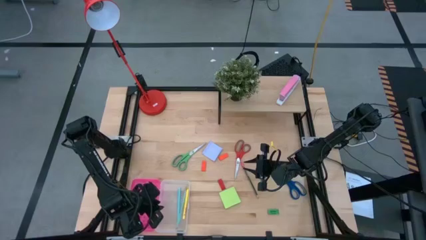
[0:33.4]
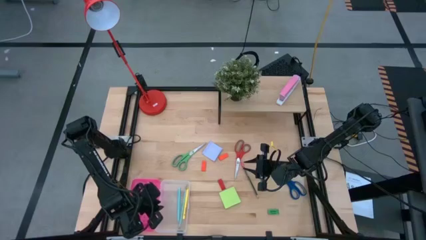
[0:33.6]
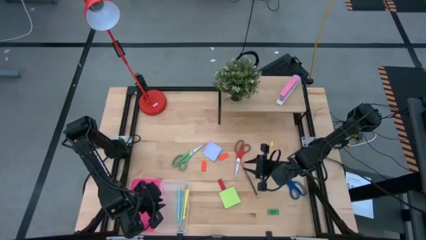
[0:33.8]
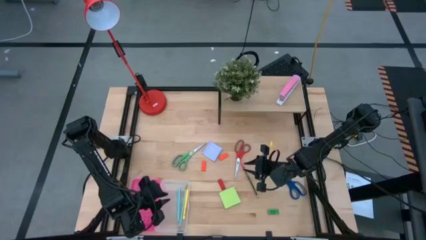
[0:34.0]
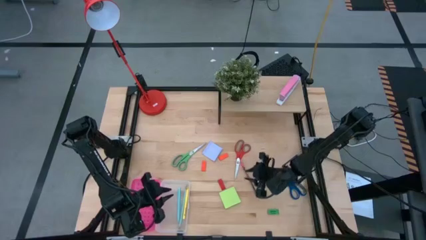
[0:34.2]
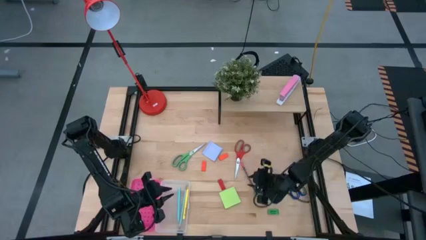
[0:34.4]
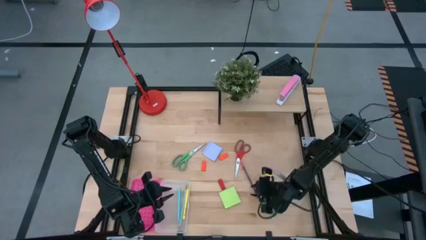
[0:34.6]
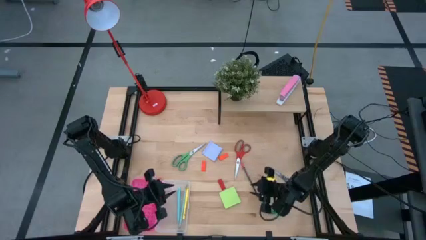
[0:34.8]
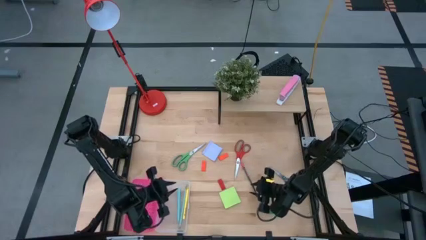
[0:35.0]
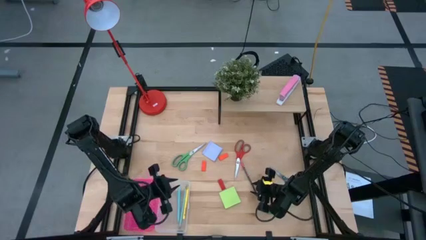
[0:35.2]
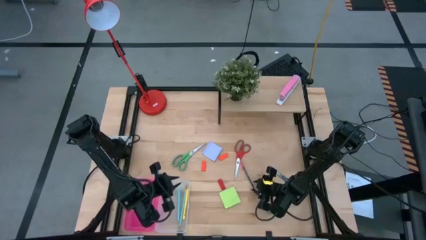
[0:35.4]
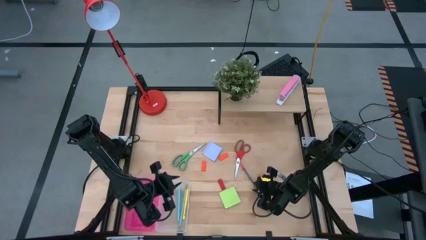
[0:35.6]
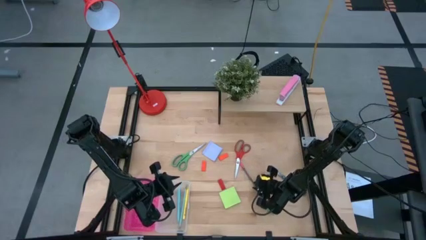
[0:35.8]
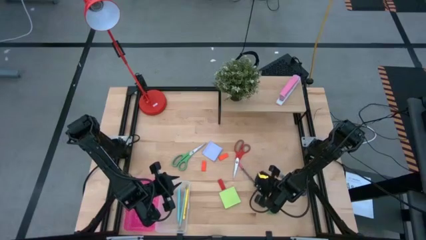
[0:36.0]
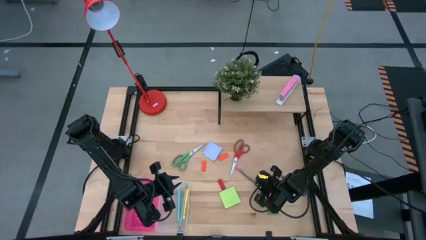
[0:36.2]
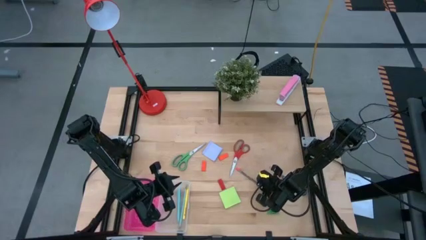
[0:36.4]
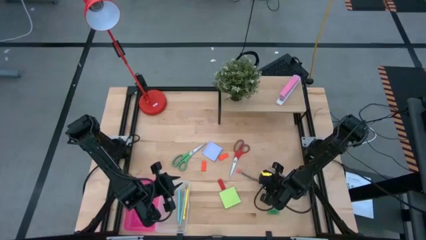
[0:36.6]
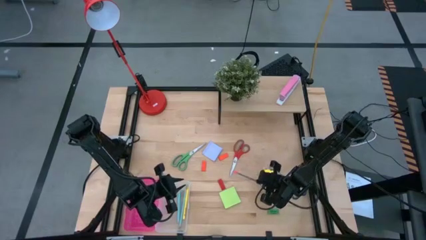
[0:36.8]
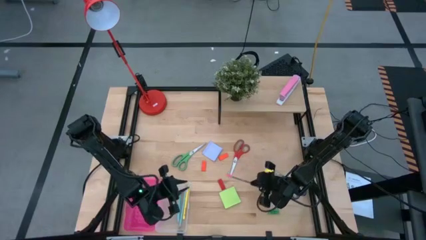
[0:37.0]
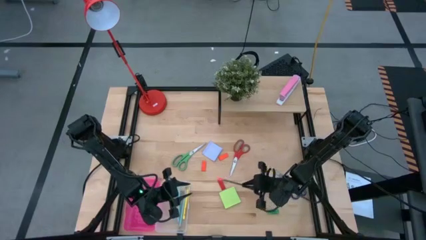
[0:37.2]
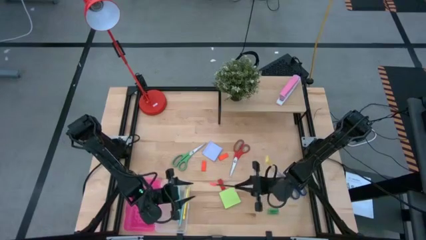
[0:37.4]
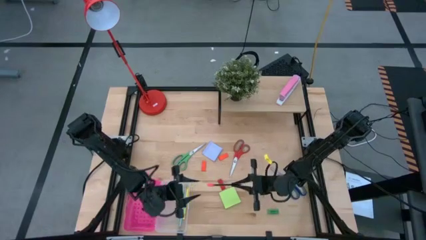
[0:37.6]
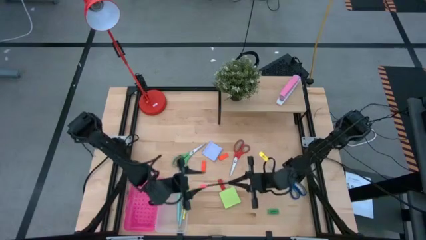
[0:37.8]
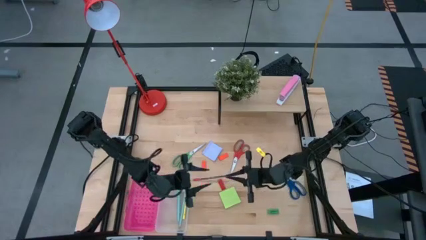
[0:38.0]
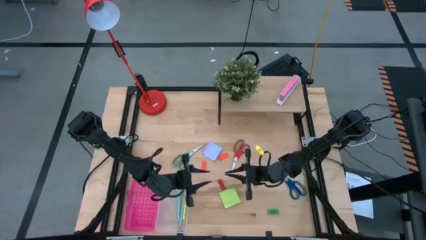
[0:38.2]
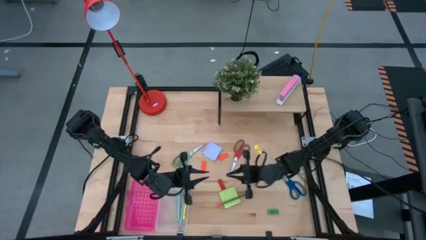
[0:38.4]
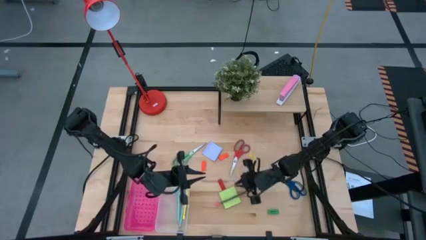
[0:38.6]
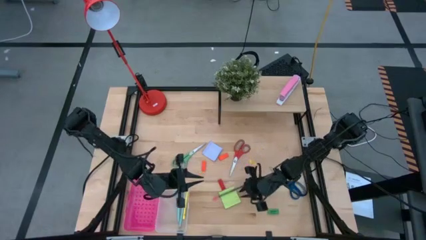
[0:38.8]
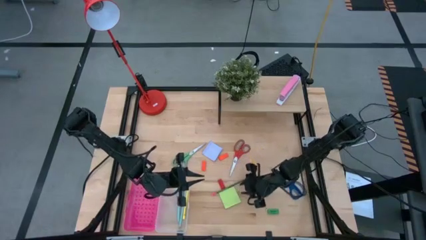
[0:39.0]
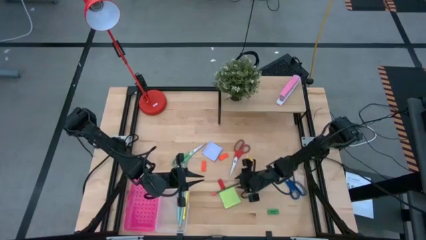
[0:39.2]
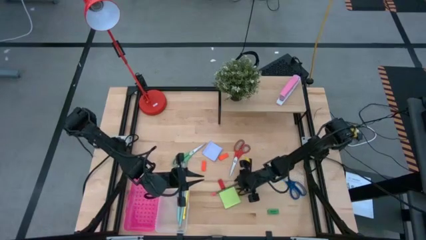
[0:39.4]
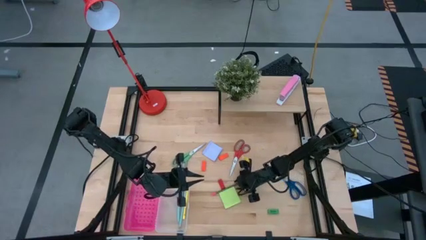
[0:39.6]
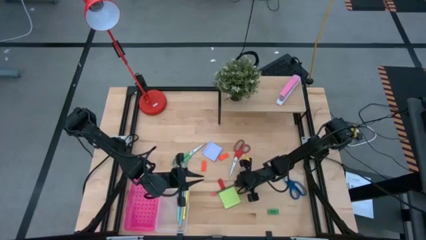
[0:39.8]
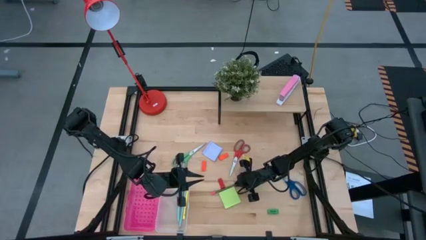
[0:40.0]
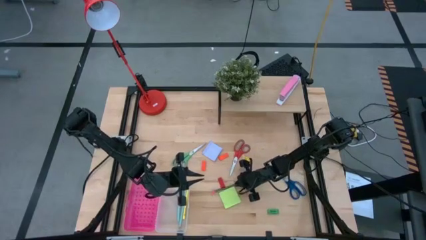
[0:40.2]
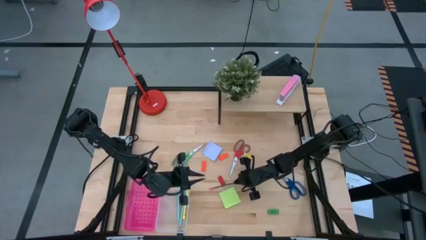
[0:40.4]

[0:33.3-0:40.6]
Task: Pack school essentials
Put the black pencil into the pink supply box

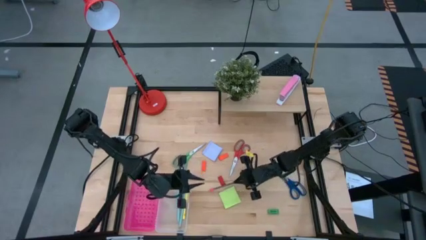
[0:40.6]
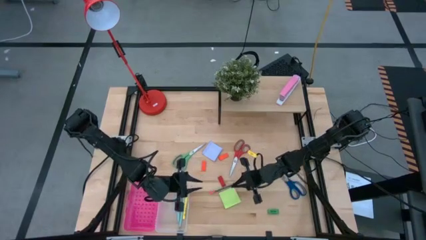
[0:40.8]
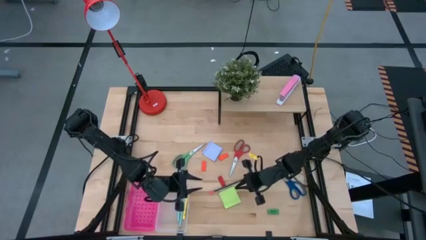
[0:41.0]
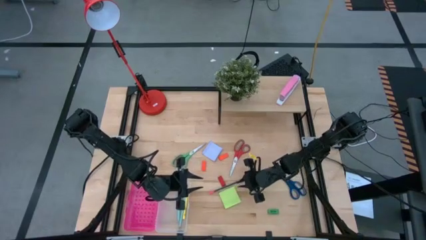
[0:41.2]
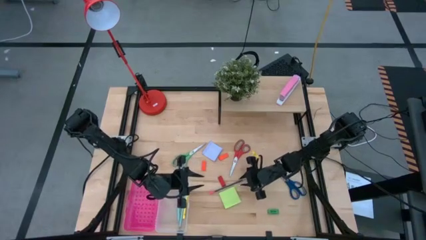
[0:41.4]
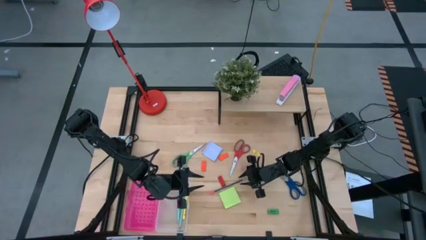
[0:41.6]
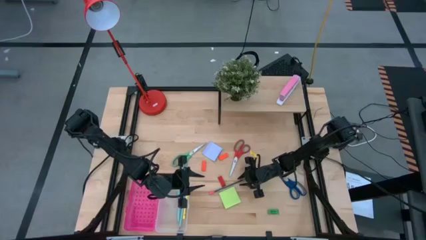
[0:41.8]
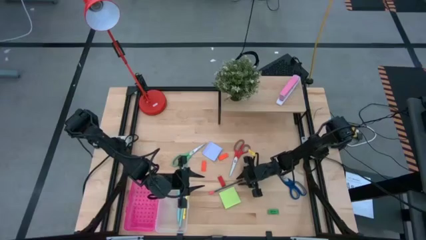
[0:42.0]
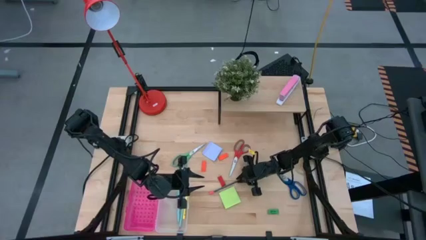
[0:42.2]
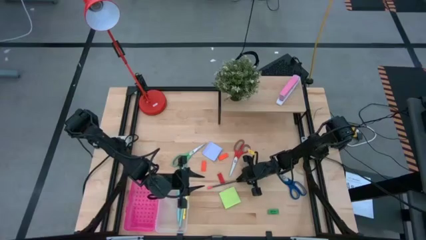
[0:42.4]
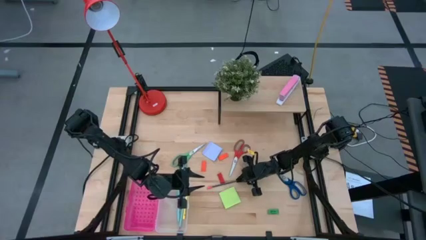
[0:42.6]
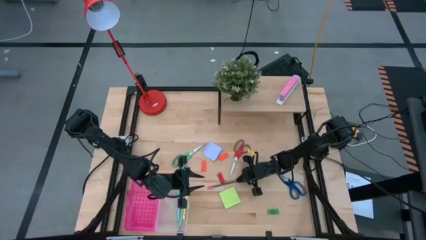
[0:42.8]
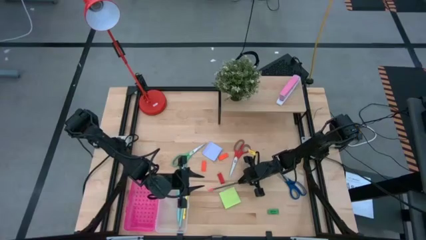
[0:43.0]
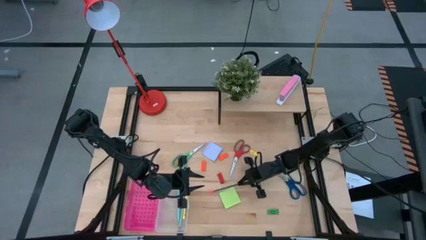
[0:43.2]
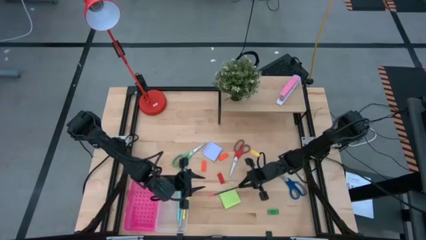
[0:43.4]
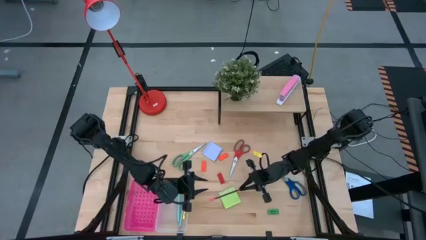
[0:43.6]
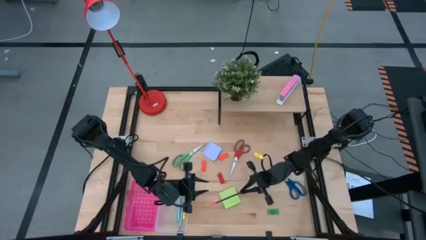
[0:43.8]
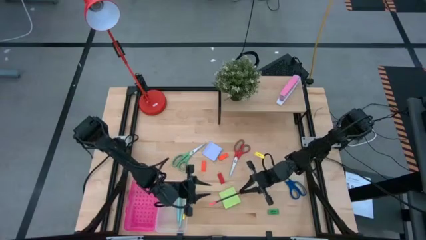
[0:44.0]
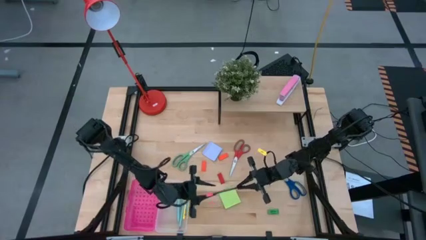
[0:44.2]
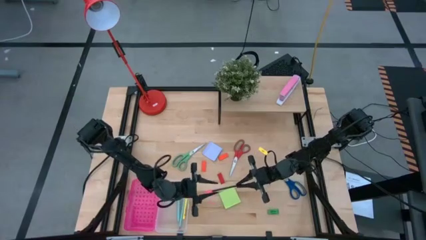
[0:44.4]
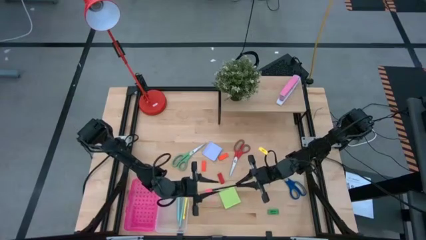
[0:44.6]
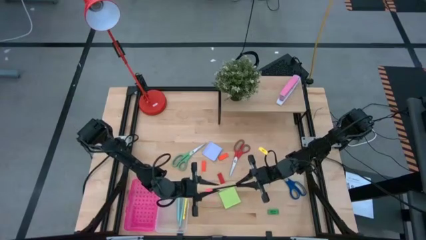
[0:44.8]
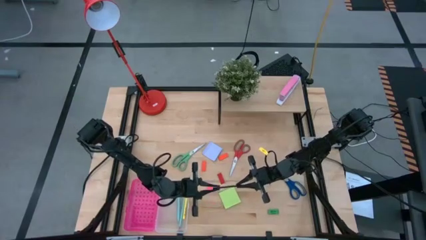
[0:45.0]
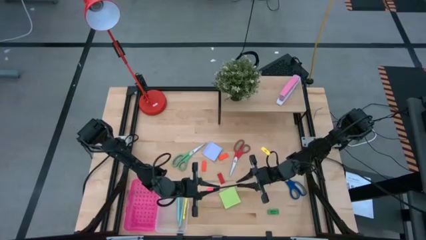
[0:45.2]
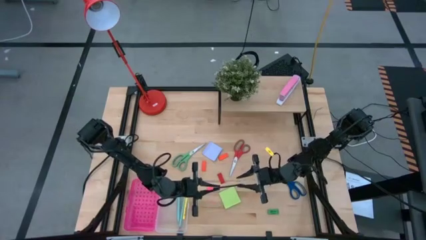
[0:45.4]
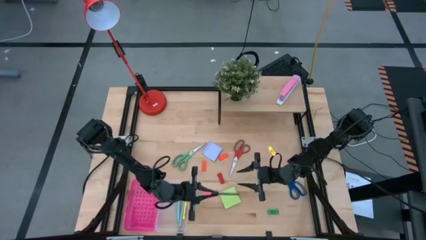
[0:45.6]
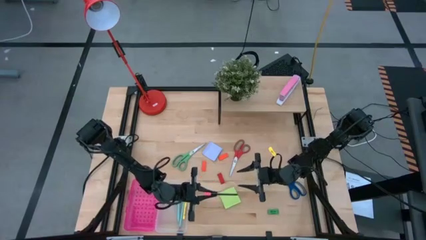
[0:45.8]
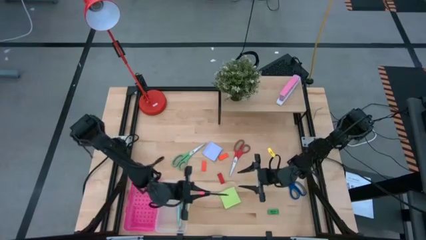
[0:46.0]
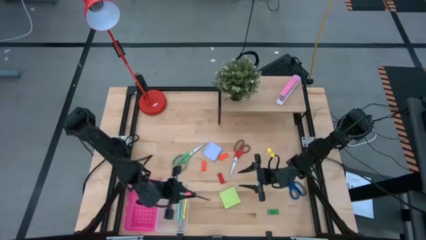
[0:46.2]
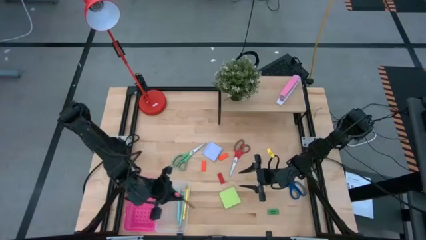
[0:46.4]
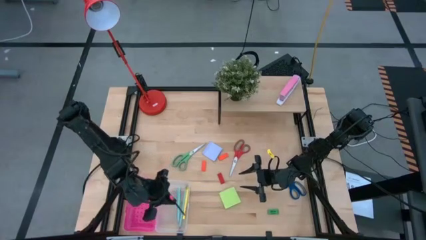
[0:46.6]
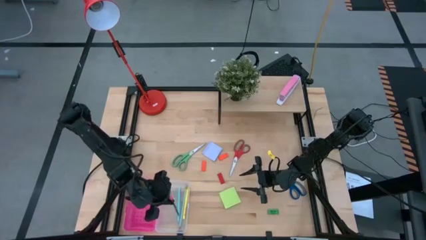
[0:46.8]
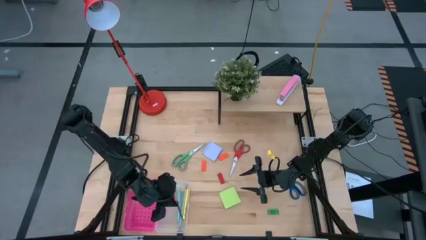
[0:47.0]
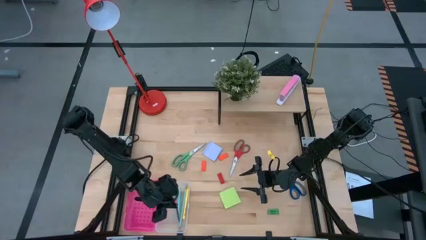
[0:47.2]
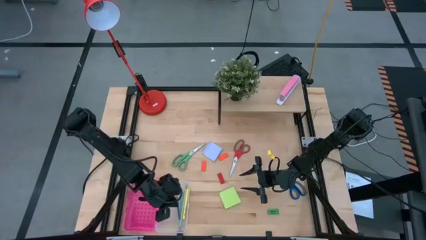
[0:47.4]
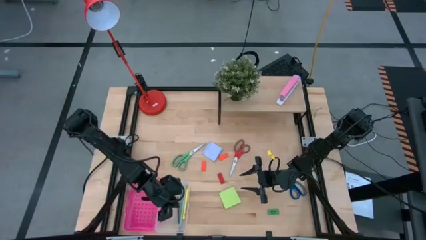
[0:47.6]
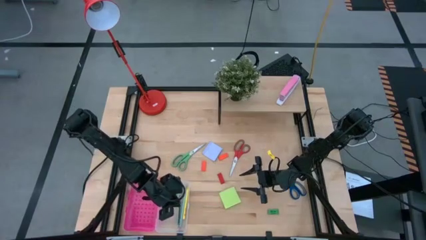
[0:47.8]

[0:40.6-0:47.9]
Put the black pencil into the pink supply box

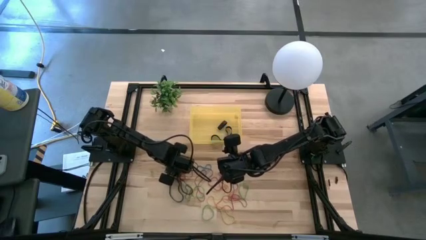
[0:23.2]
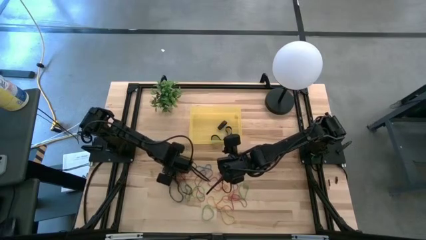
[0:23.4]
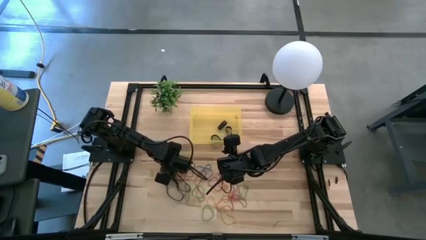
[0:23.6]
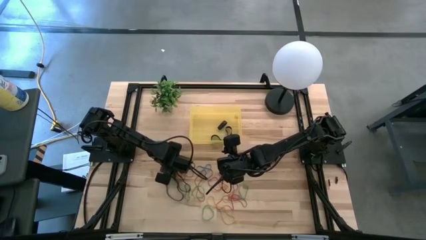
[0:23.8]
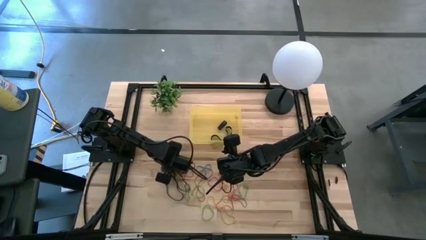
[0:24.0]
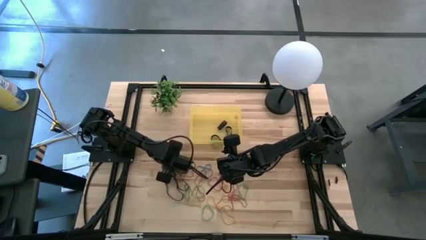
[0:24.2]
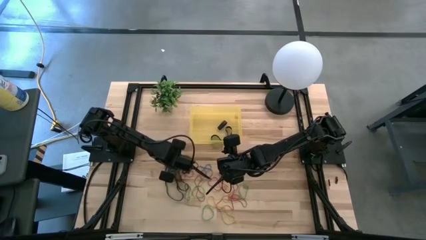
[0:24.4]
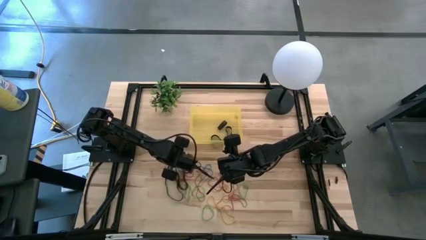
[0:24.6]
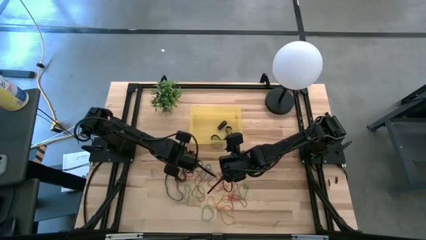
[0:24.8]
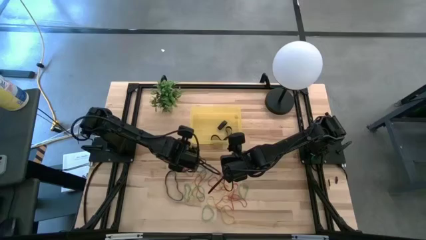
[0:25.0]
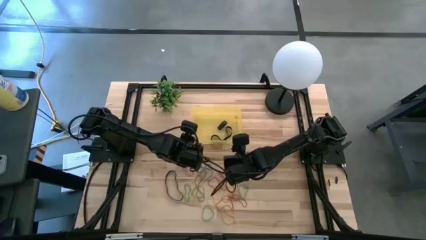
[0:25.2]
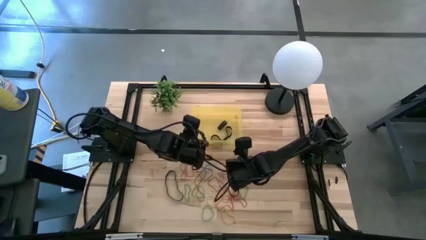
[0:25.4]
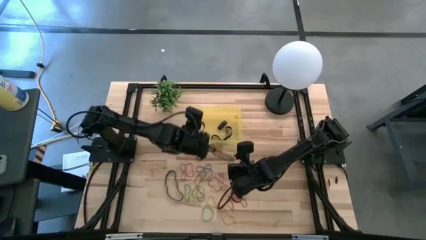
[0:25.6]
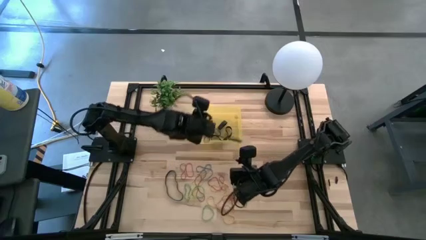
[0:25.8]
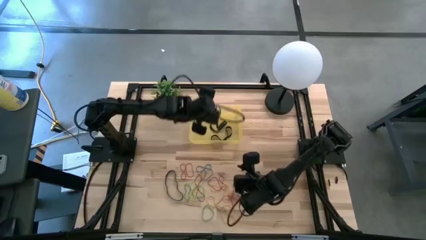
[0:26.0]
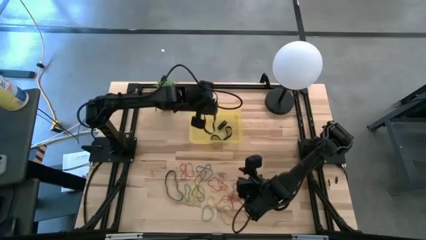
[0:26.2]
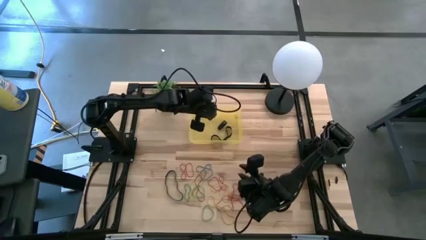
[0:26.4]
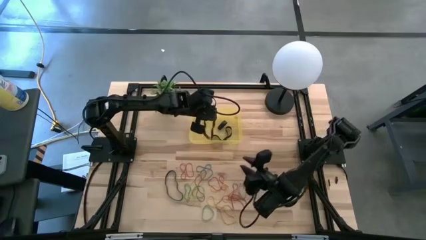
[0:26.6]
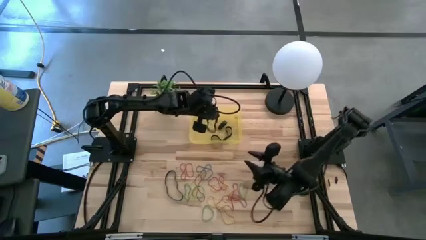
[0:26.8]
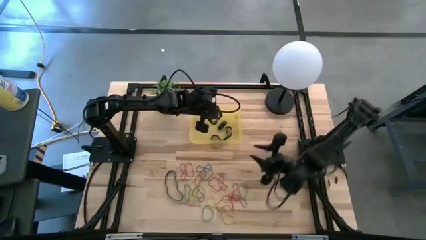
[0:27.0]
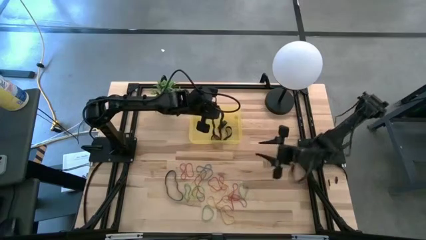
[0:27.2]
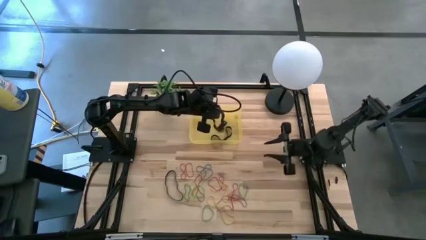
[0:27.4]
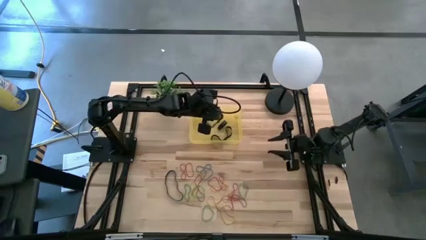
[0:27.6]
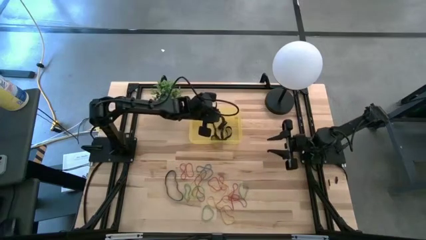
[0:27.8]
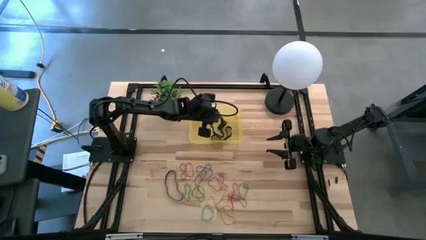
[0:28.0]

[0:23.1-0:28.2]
Task: Pick and place rubber bands into bin
Put the black rubber band into the yellow bin
